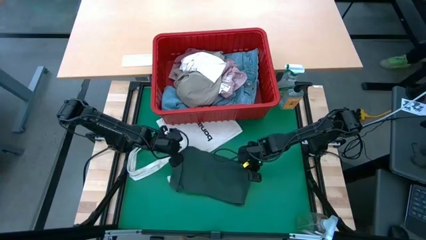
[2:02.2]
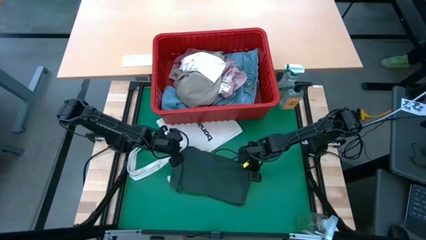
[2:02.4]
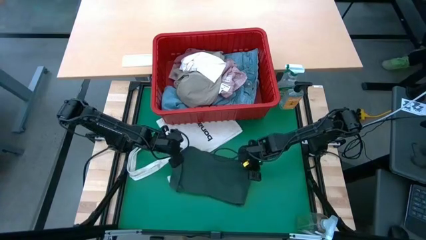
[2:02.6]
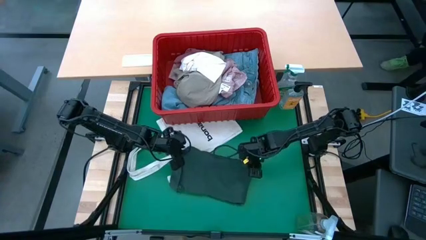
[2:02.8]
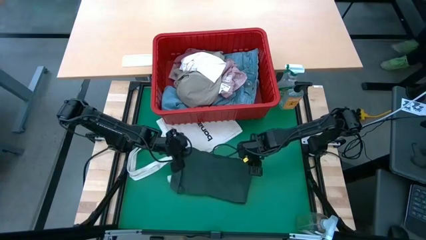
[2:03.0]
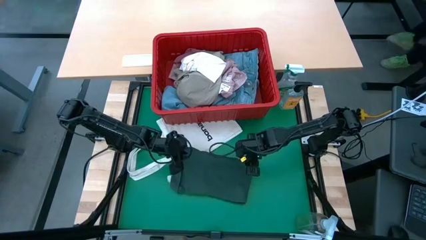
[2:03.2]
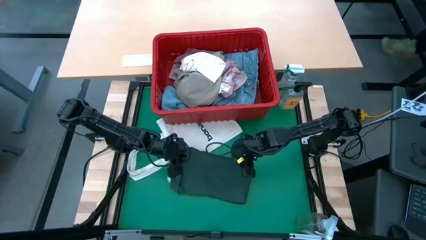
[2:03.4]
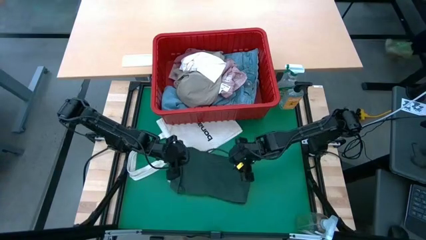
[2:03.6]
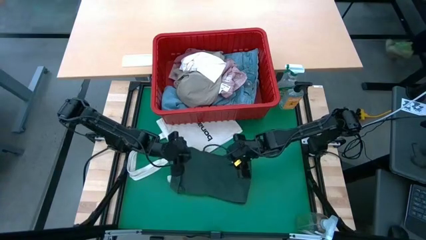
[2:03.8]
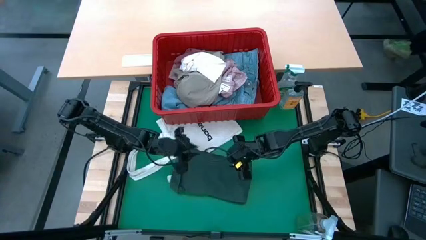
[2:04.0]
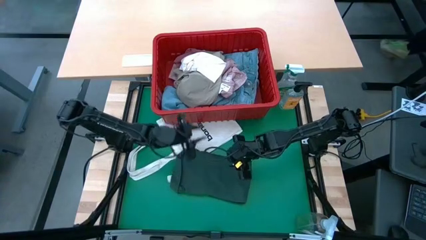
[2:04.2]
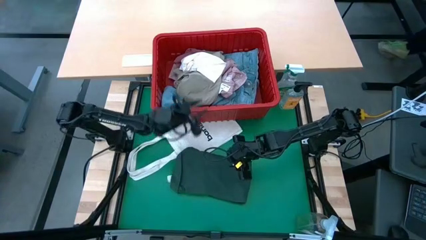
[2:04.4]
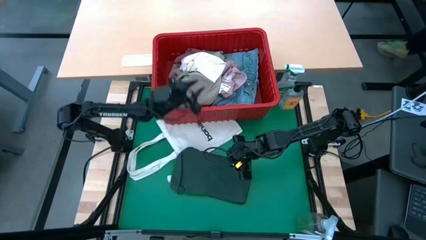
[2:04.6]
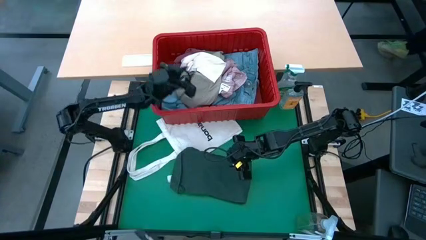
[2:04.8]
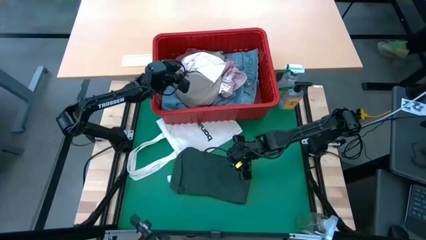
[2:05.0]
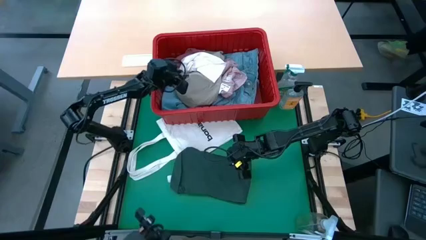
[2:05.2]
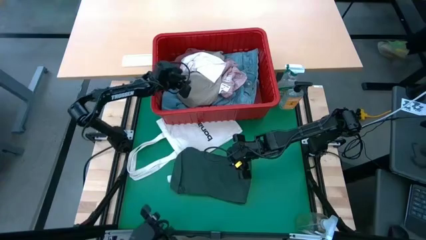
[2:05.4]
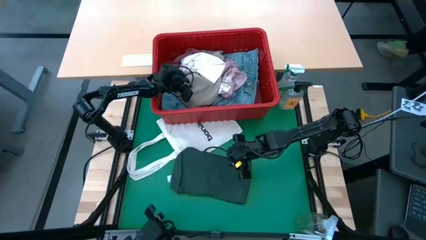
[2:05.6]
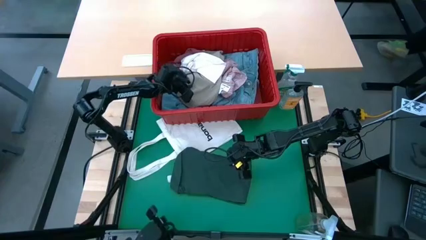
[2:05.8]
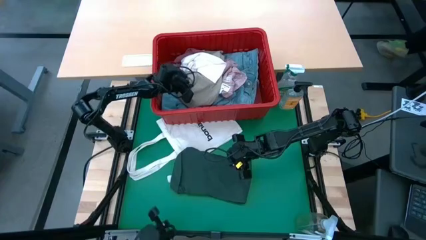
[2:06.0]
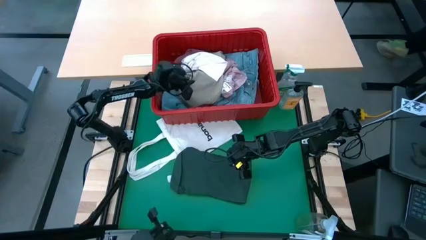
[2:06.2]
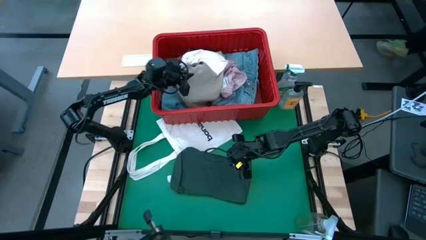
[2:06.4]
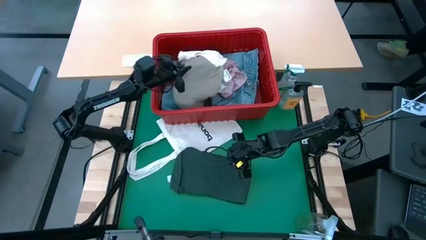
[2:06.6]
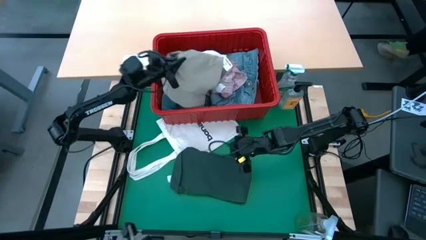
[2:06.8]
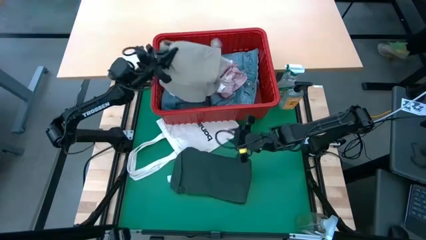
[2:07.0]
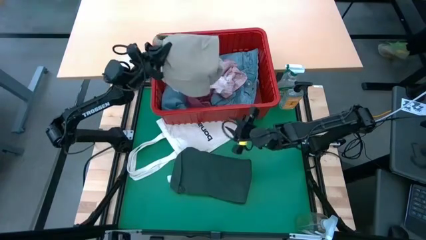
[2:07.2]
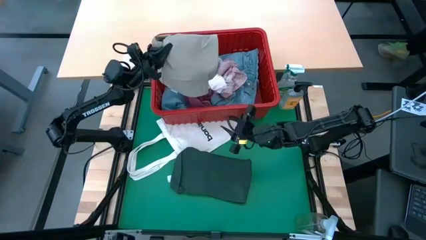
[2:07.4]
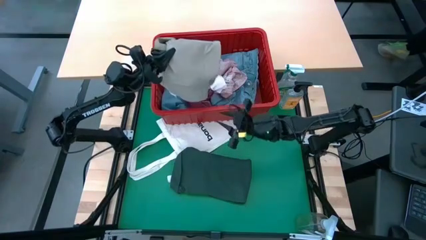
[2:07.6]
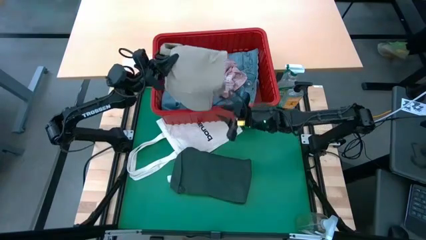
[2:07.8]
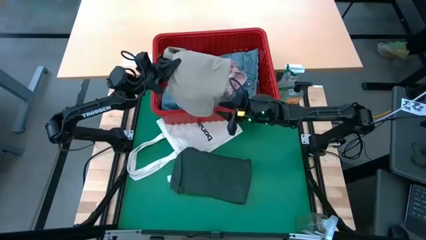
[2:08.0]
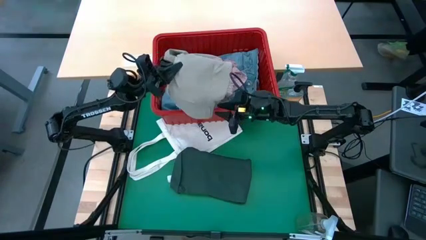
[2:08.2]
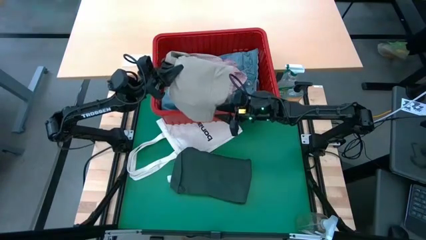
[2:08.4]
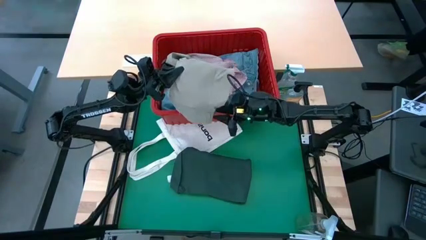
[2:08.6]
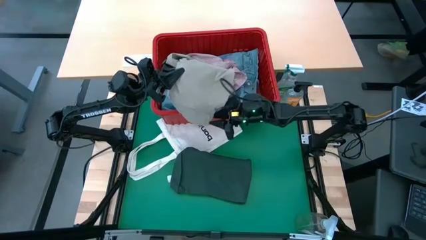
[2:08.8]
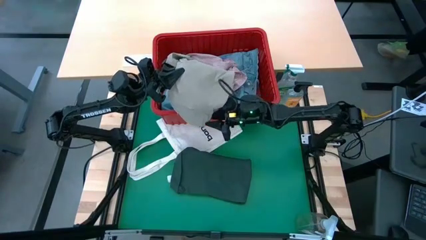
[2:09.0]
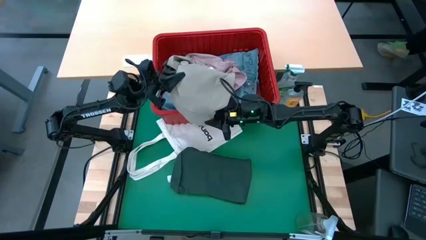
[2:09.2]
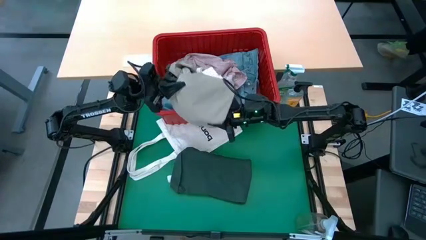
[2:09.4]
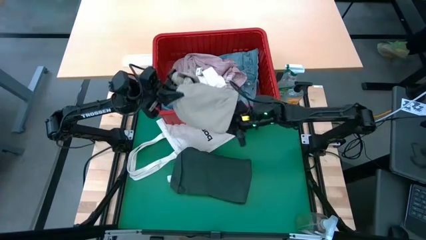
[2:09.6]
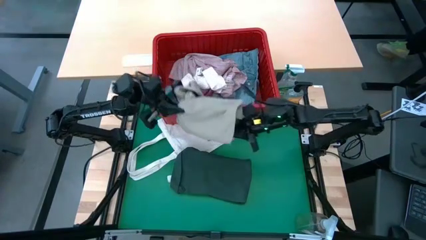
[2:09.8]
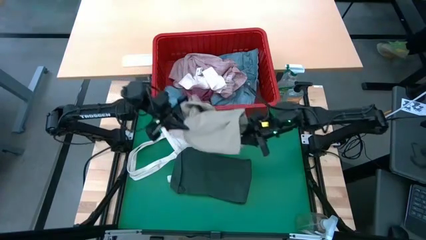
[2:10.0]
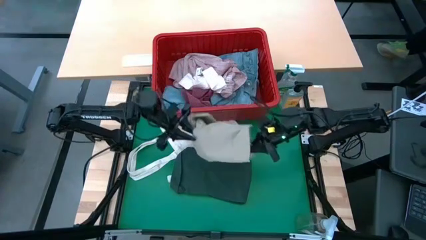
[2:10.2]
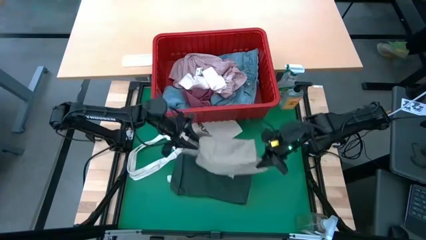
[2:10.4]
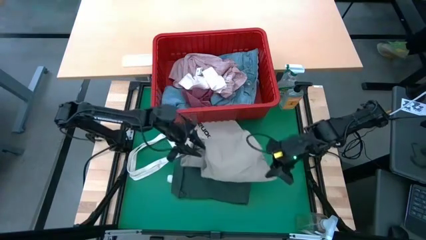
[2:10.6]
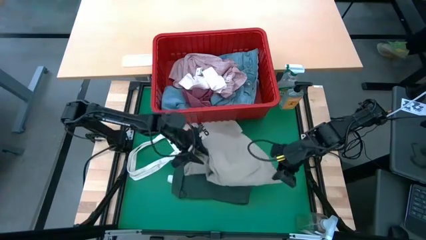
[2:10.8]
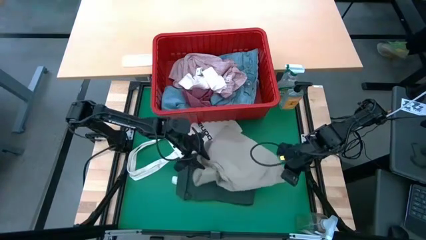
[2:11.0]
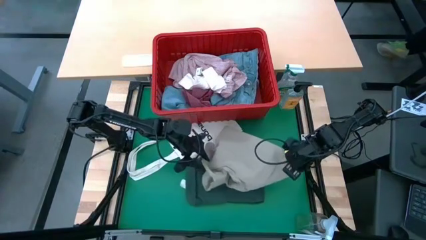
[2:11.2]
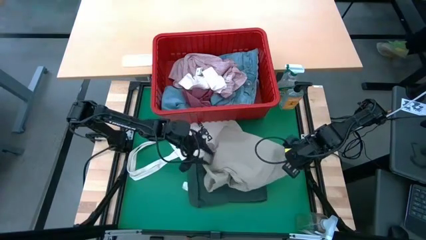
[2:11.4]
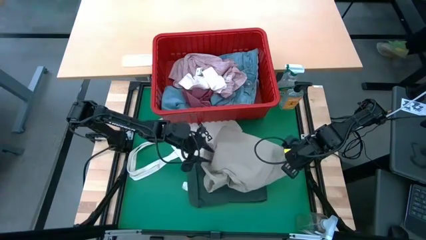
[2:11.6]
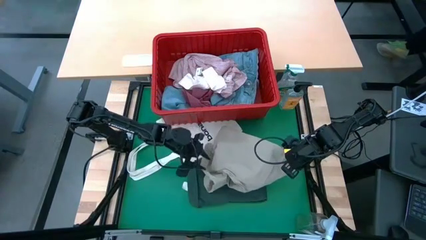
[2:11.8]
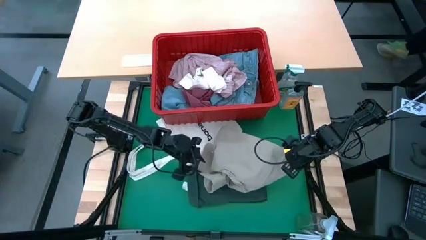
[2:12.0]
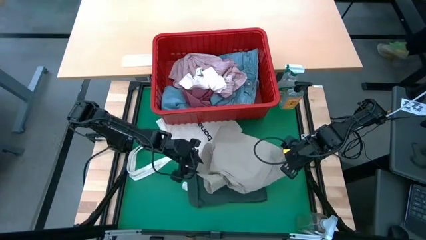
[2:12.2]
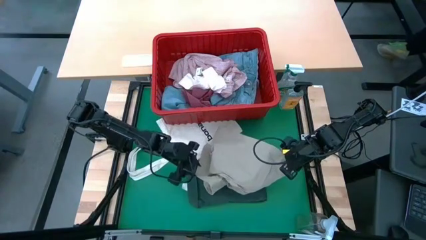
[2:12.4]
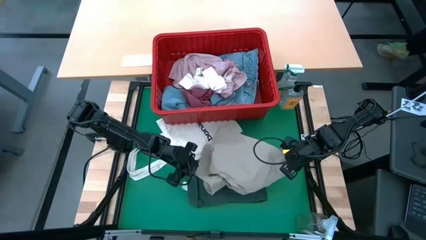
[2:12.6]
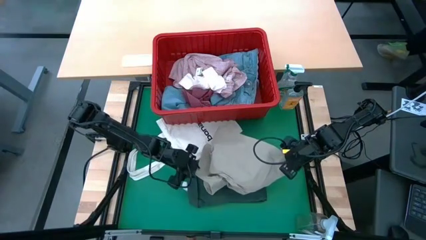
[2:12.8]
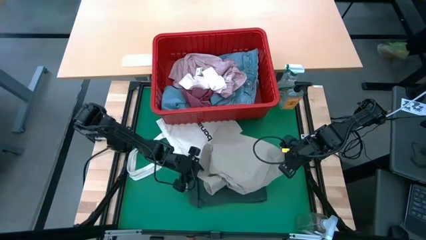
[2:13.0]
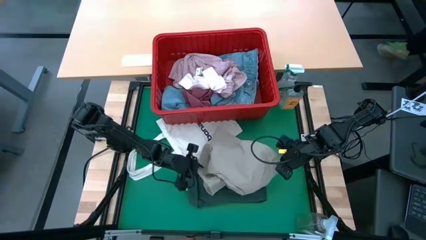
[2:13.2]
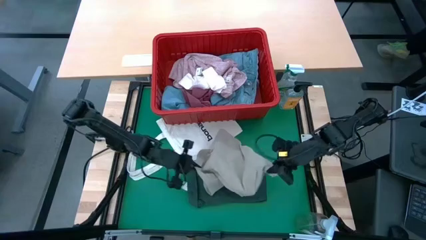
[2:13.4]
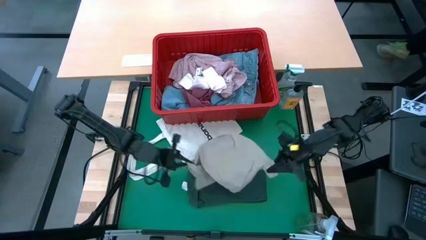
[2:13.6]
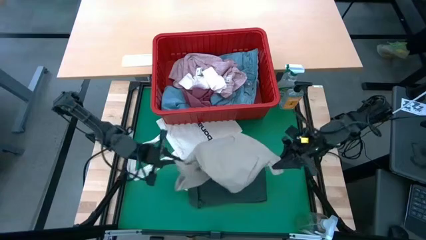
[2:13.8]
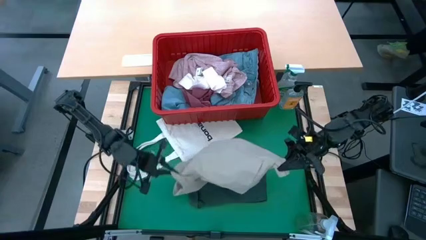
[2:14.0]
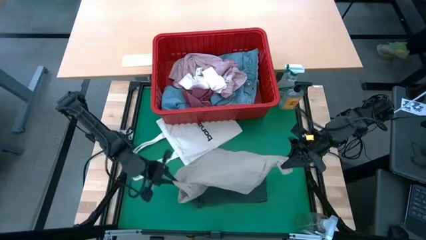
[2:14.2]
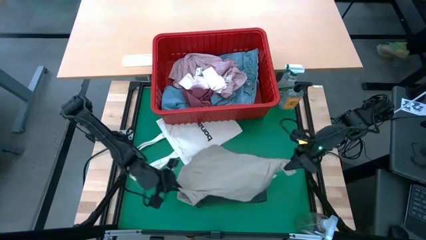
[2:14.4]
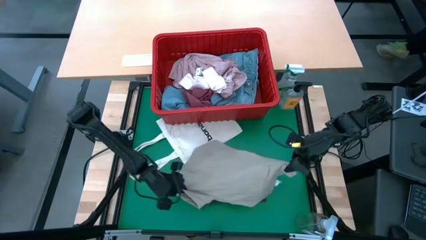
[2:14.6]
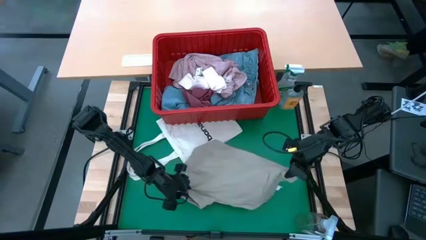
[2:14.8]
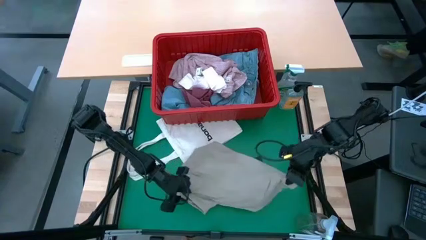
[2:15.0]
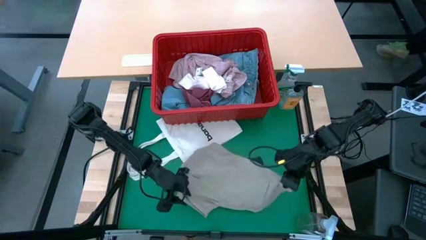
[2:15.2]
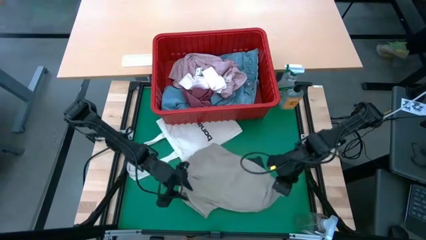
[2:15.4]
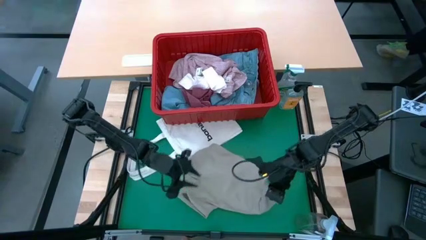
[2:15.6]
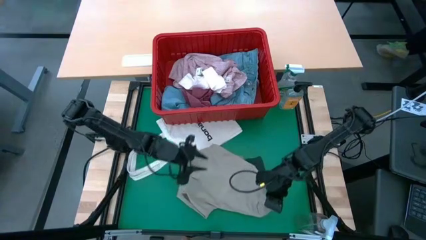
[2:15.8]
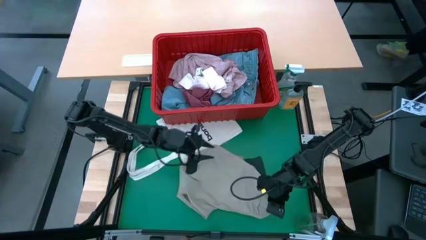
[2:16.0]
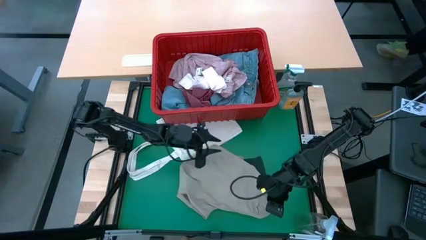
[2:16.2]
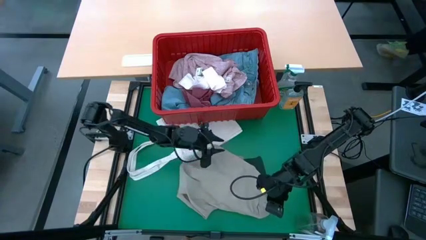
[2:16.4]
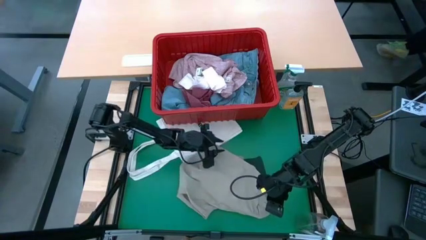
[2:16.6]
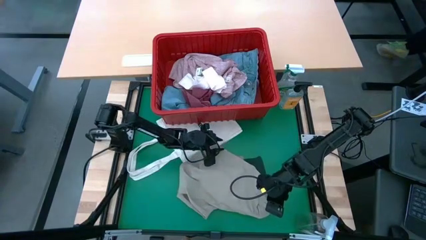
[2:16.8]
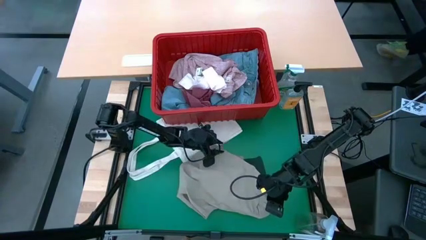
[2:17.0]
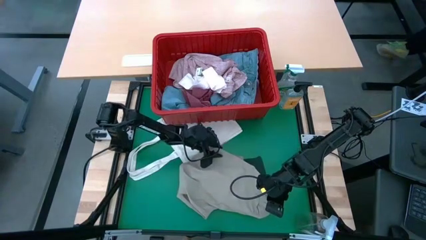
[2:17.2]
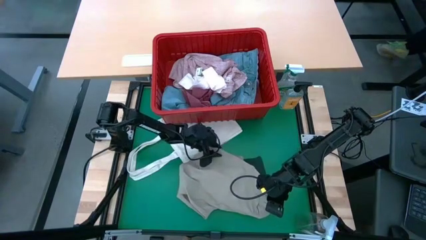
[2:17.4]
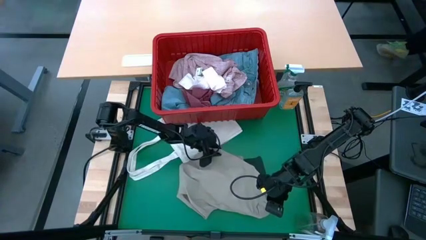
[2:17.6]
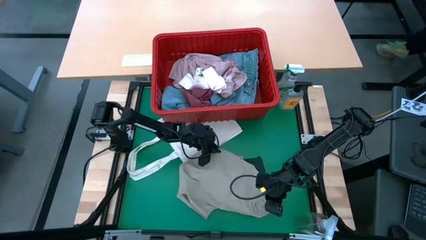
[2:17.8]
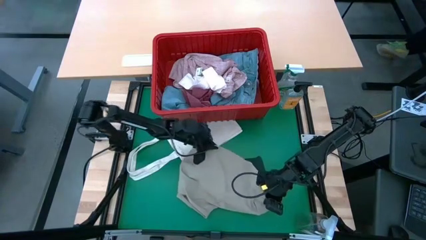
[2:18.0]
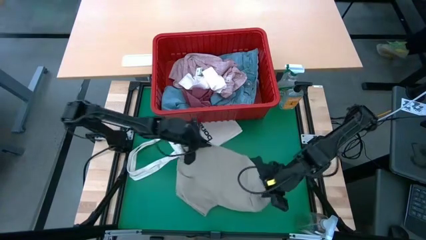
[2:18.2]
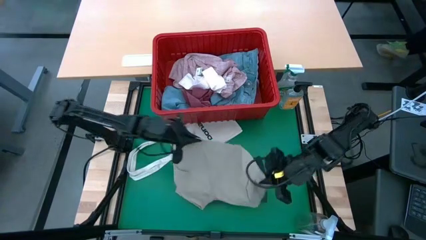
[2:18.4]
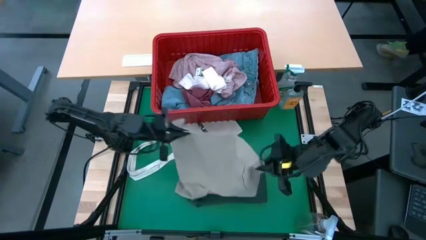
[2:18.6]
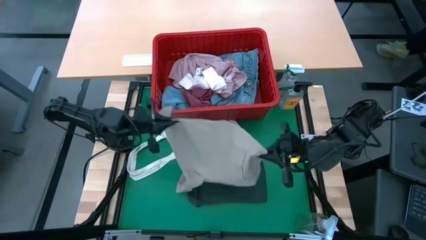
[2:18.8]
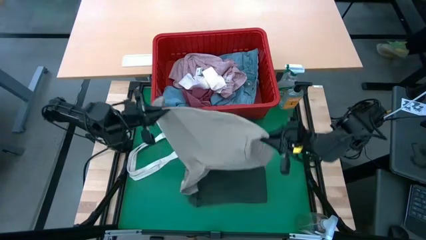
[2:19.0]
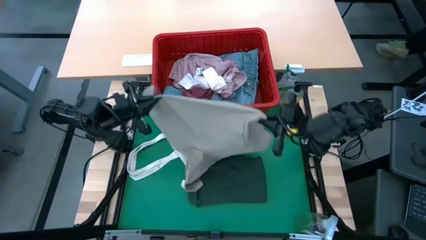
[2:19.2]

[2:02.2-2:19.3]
Task: Fold laundry
Fold the grey shorts
